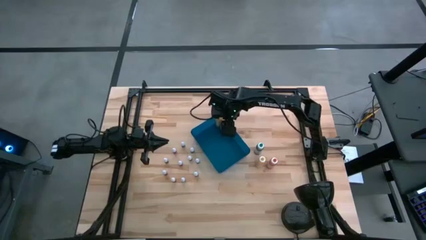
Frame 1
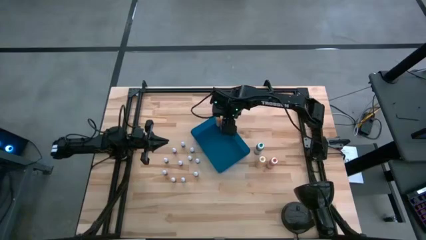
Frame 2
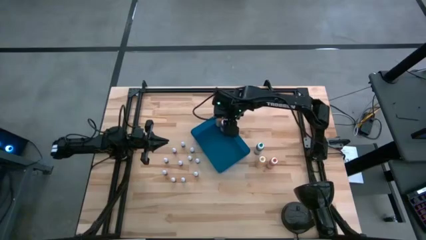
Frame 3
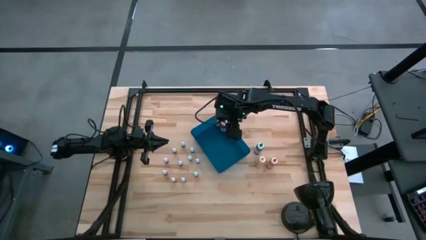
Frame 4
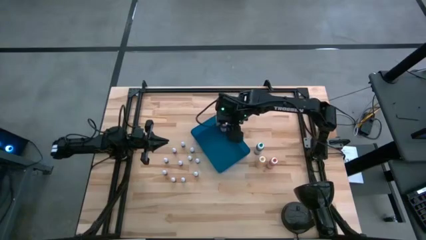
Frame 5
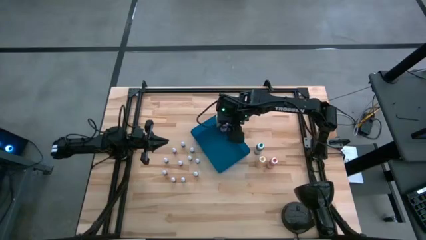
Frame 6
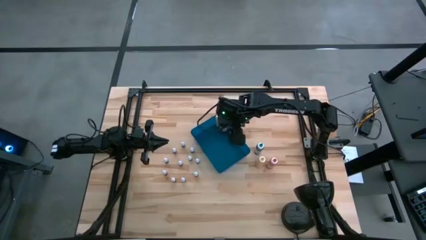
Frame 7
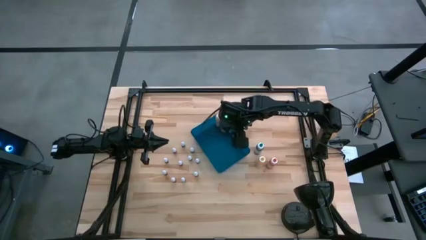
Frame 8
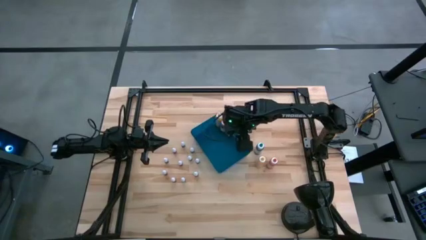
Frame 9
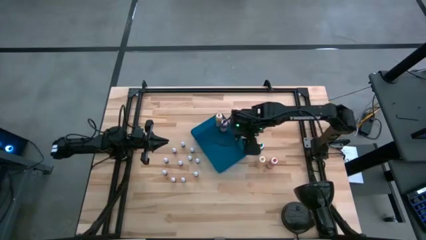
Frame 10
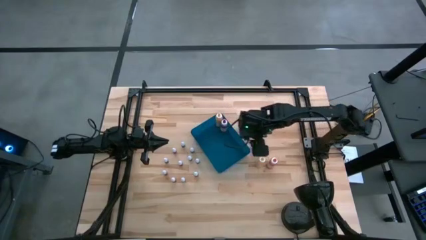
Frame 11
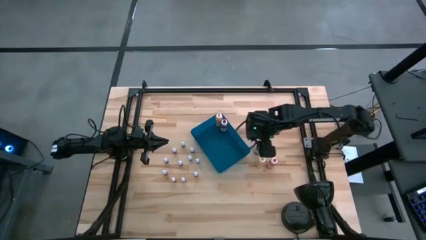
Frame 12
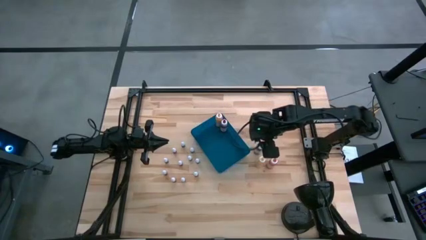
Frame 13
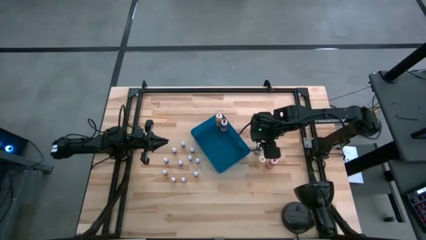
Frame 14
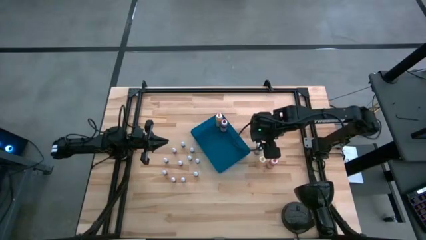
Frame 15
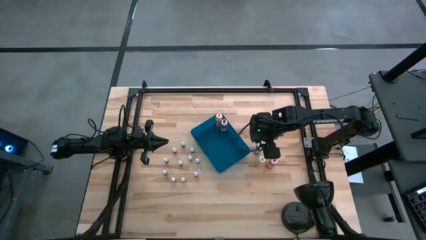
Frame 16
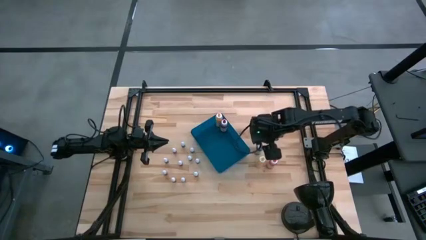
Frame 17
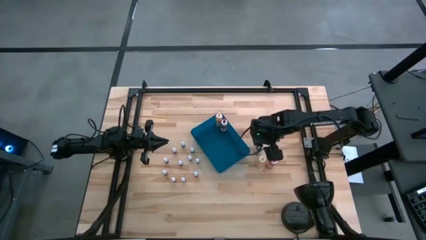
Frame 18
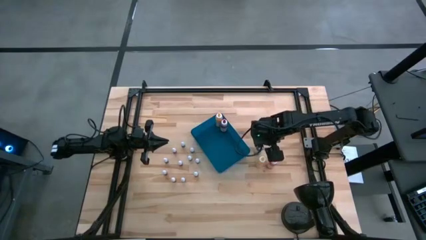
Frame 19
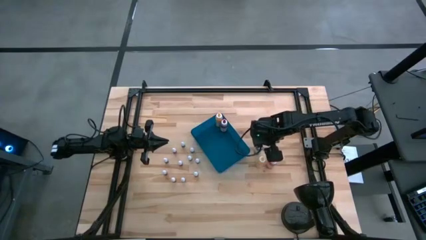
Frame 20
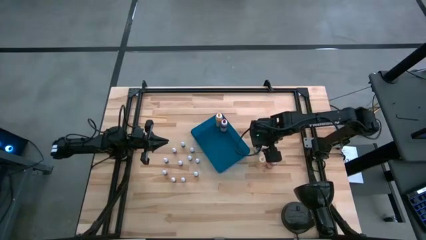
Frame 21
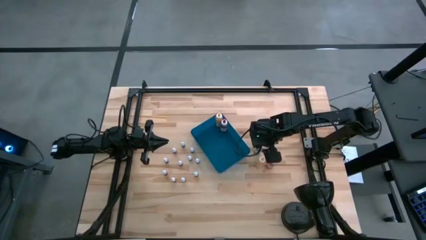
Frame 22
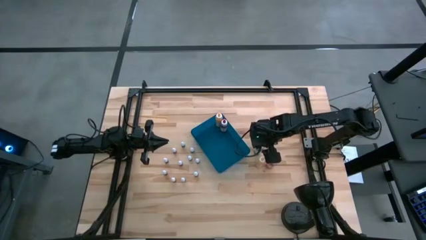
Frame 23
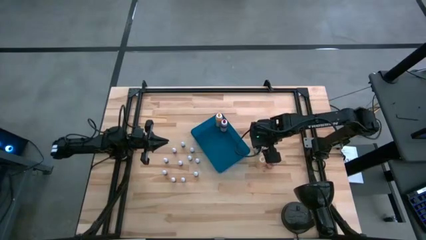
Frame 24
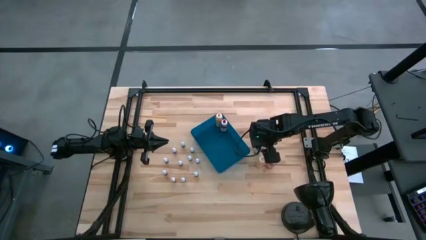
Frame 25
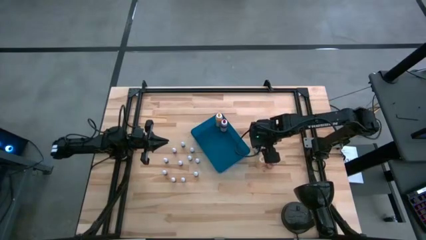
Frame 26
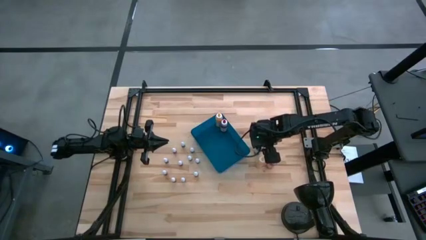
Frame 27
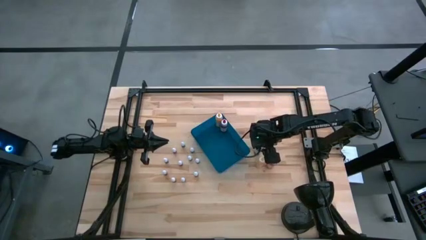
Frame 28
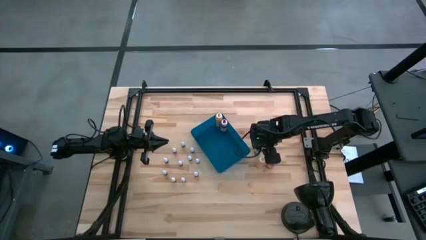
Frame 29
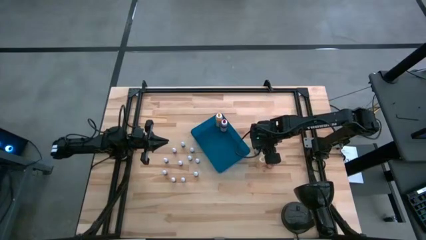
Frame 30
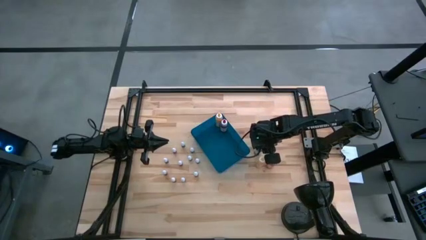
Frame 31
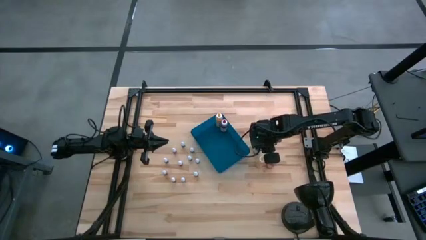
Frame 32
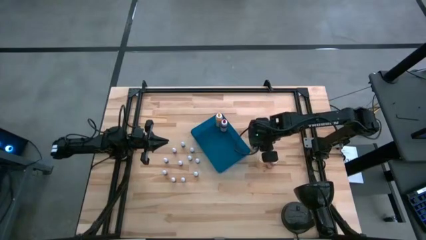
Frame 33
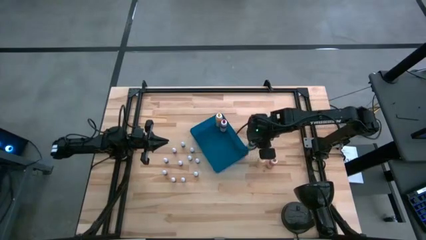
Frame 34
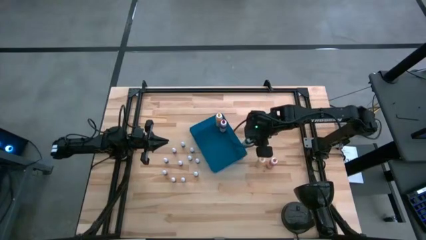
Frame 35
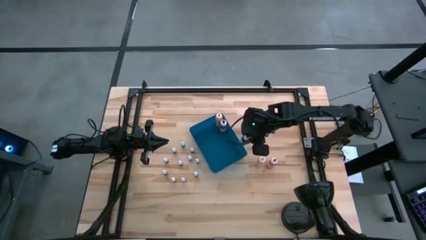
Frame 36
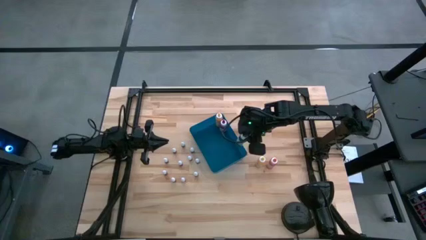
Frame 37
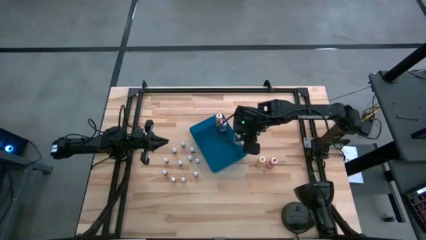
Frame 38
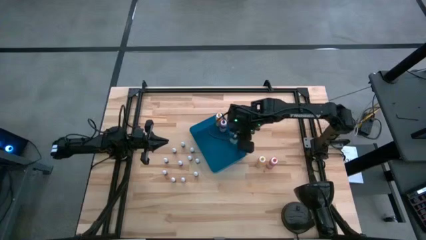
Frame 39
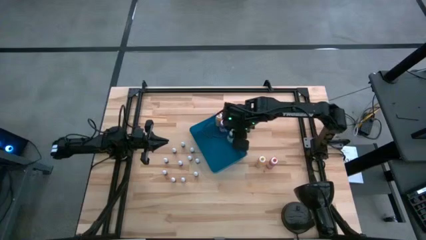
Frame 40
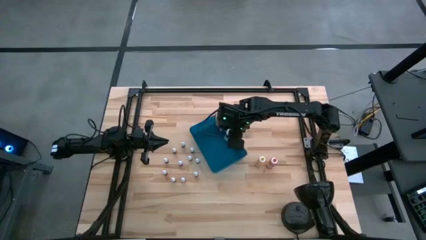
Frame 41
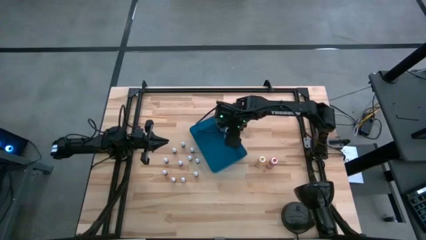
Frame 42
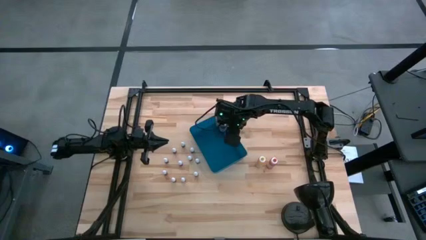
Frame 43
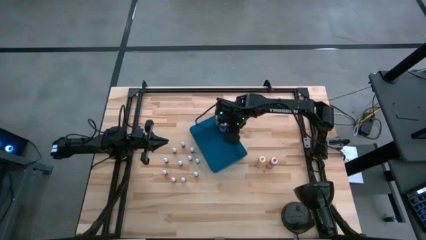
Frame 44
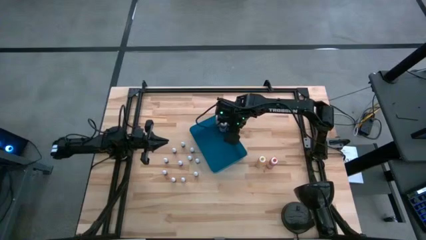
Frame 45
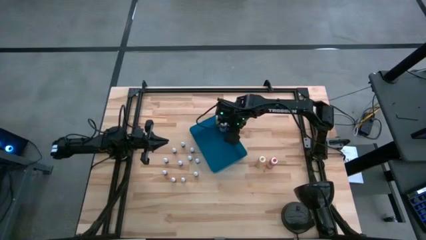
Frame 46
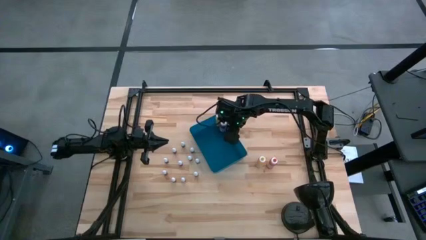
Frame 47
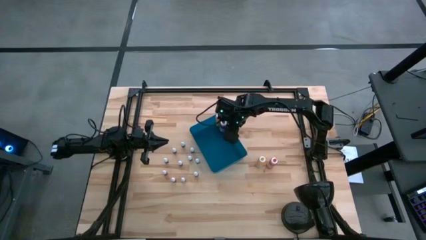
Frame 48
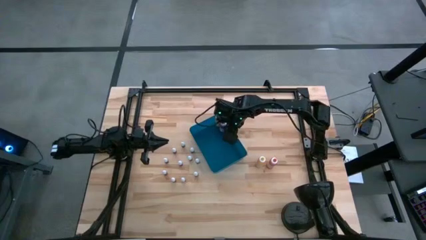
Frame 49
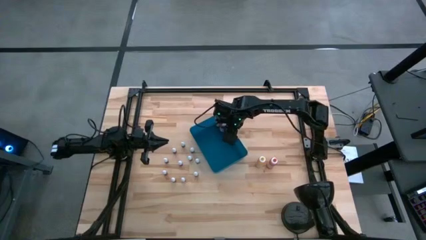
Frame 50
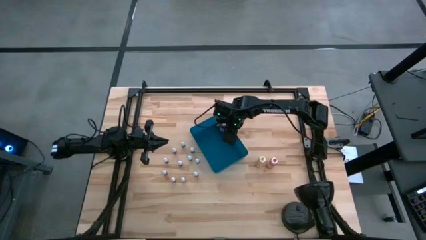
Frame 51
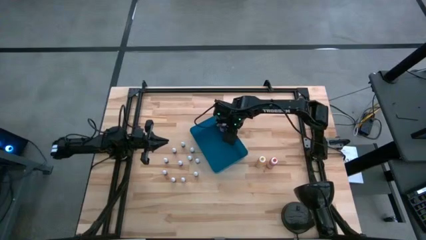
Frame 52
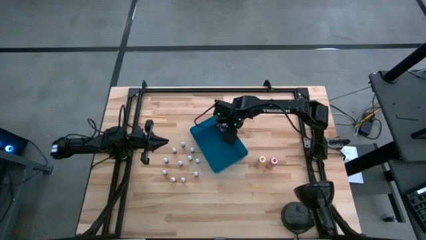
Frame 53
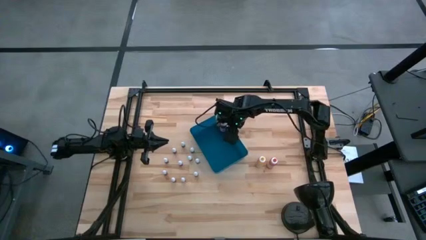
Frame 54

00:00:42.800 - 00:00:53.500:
Task: Pick & Place food coloring
Put the green food coloring bottle into the blue bin

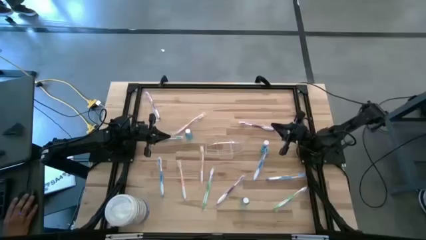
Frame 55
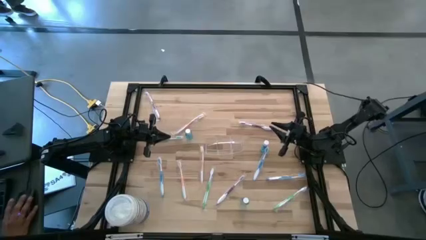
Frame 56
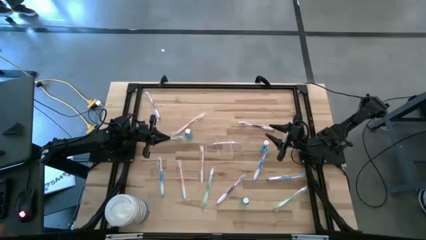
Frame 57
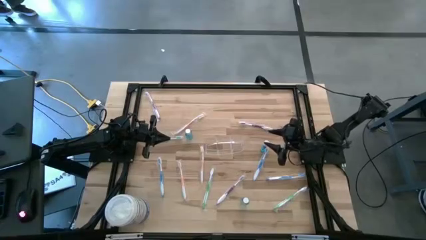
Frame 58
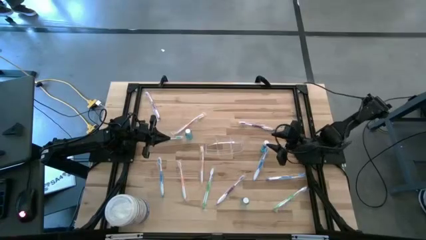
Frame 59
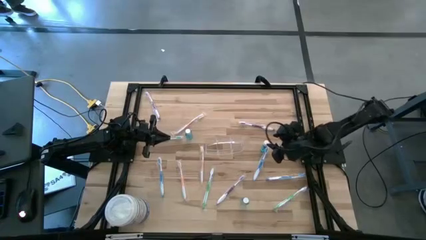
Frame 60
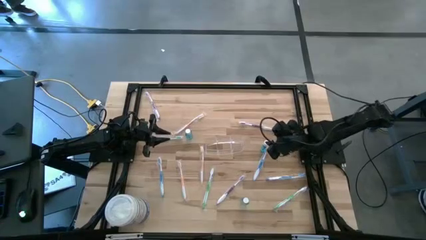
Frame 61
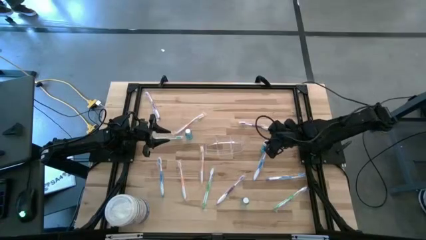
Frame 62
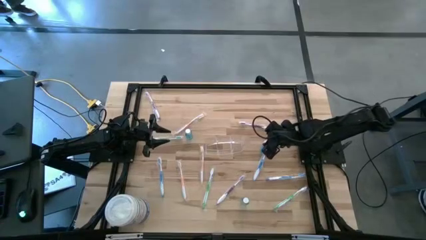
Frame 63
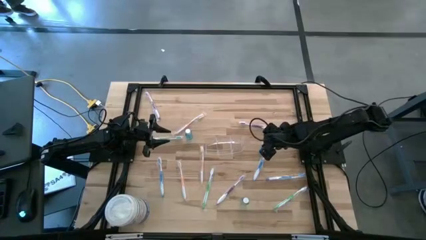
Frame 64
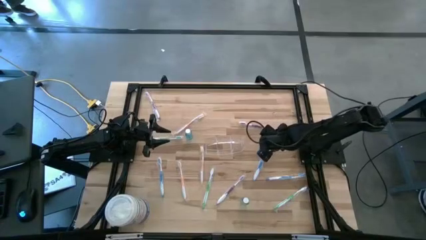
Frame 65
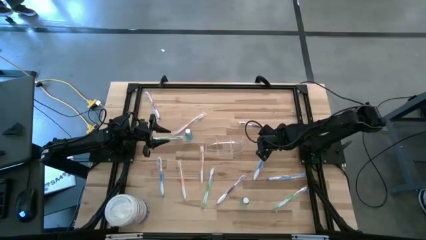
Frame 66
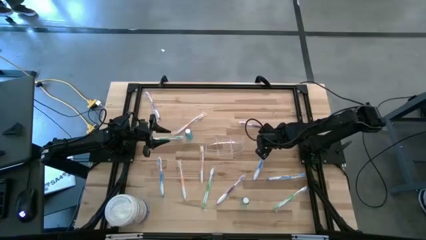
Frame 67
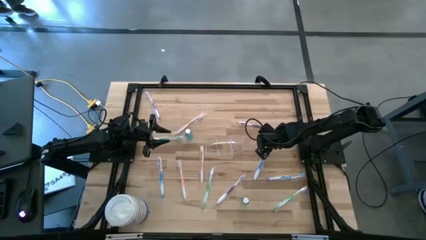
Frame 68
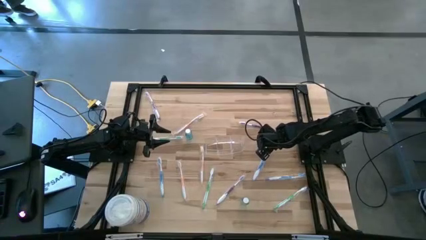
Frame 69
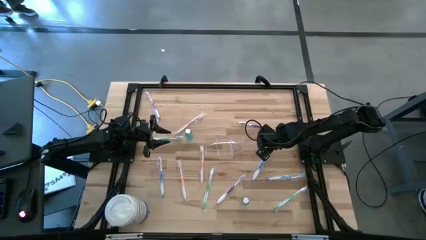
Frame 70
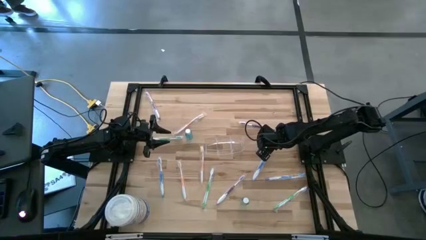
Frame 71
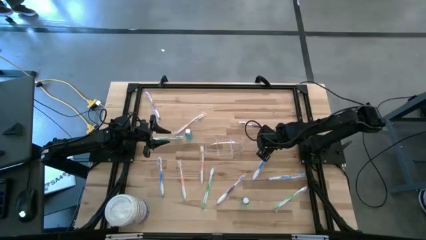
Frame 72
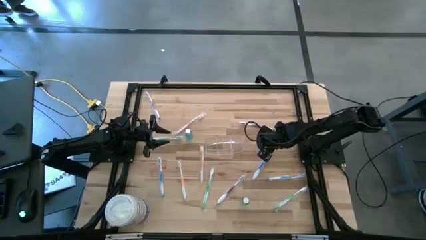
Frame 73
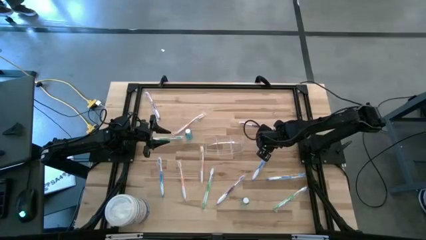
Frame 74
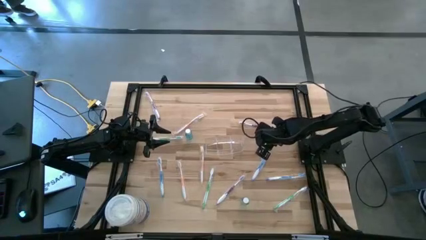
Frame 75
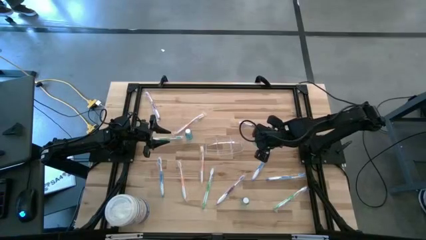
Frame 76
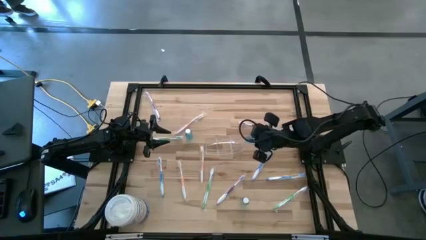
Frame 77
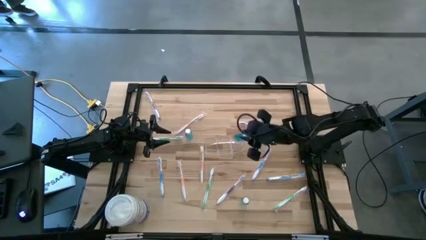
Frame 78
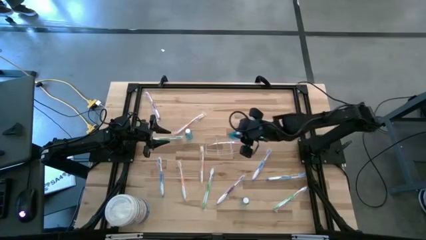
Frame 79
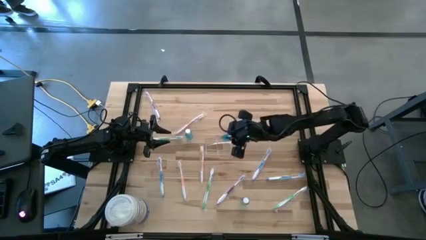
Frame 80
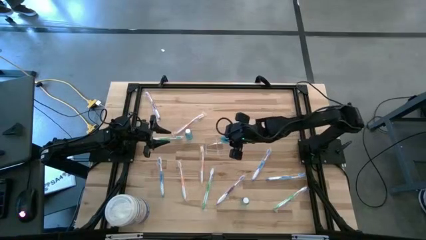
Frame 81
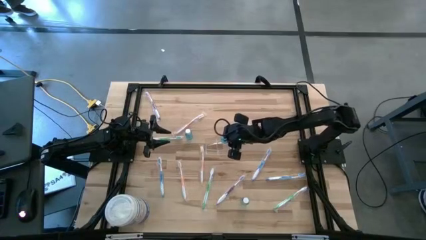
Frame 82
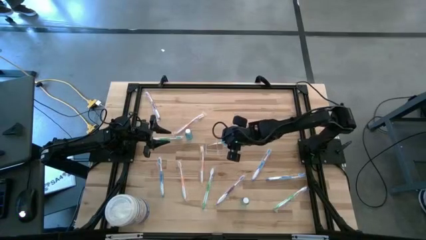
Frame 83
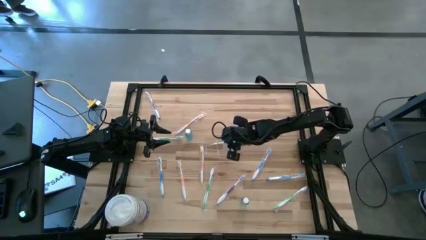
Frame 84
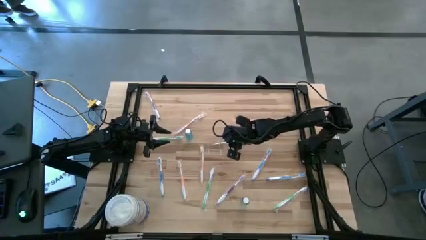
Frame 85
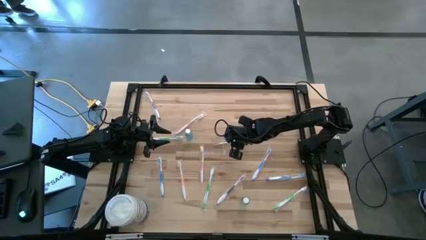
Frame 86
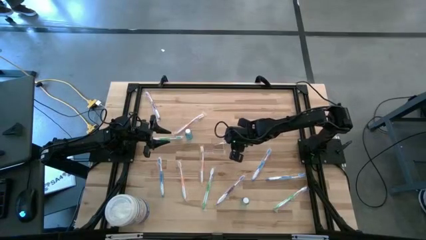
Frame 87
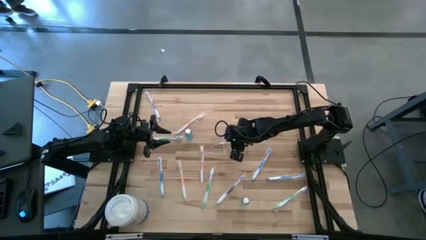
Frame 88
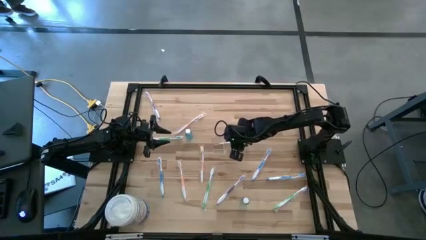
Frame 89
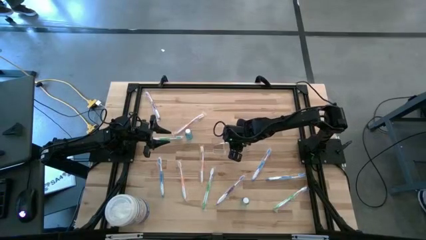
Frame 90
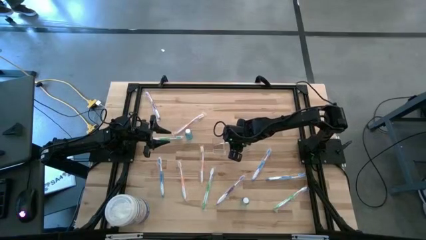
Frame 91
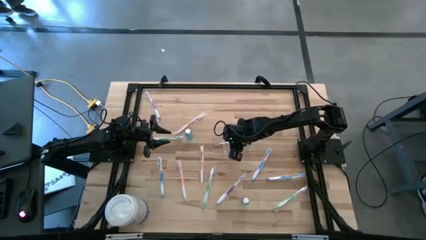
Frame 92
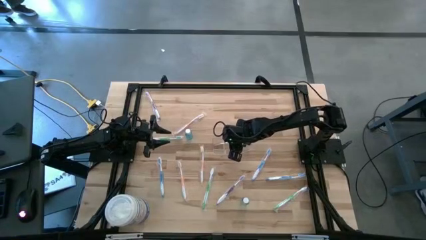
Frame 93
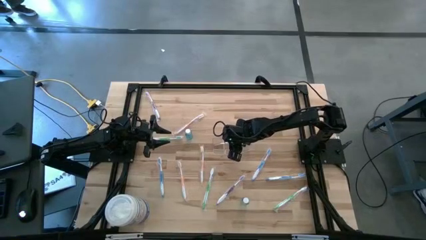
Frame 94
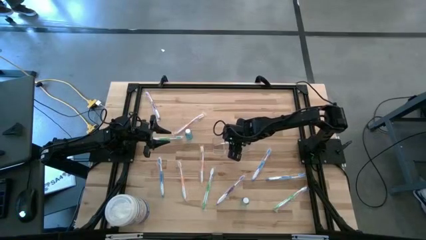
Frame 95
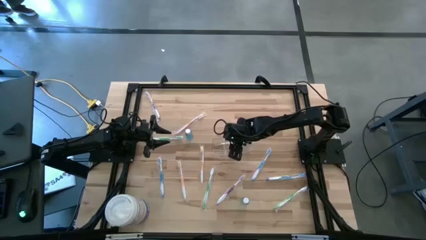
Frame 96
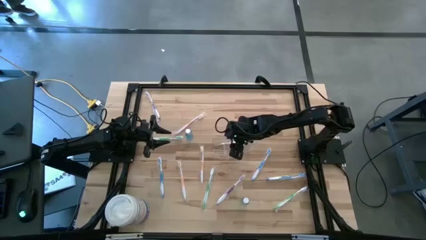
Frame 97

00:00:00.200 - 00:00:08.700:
Task: Pick & Place toothbrushing station
Put the top right blue mouthwash into the wire organizer
